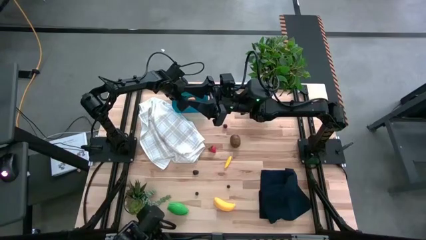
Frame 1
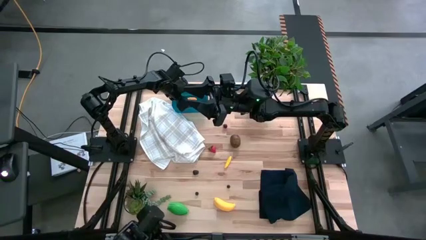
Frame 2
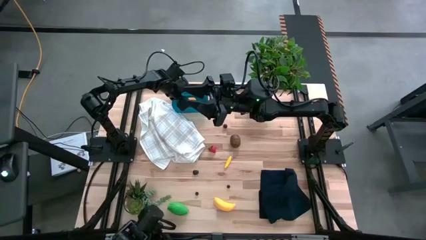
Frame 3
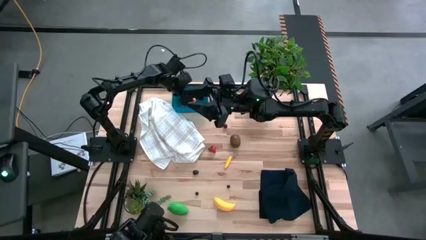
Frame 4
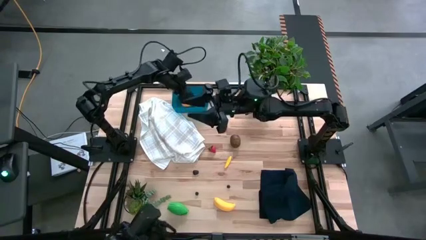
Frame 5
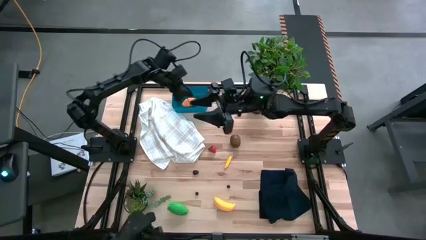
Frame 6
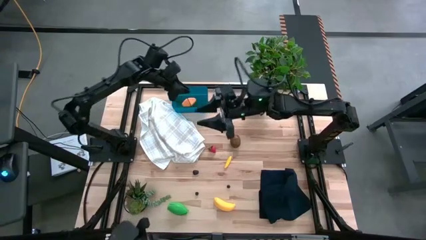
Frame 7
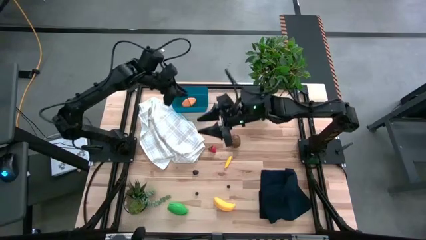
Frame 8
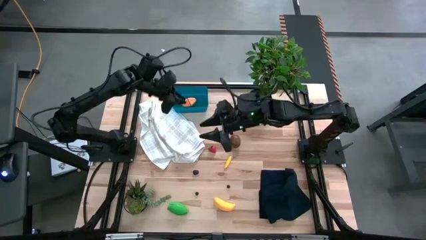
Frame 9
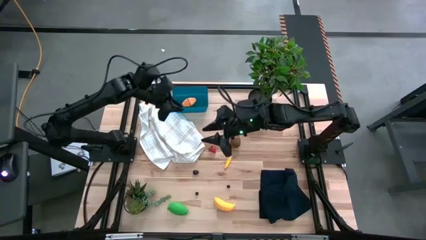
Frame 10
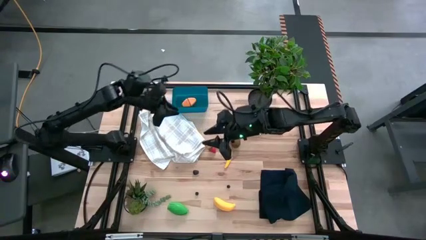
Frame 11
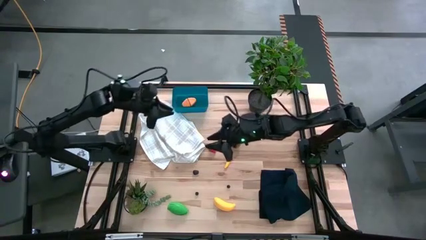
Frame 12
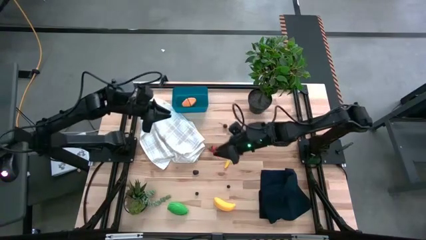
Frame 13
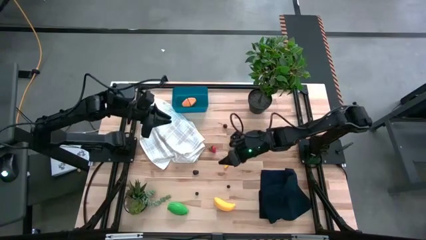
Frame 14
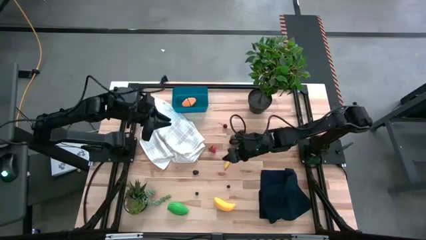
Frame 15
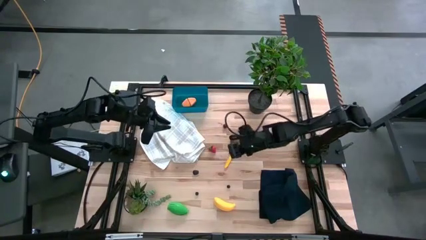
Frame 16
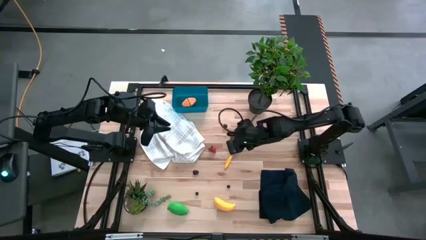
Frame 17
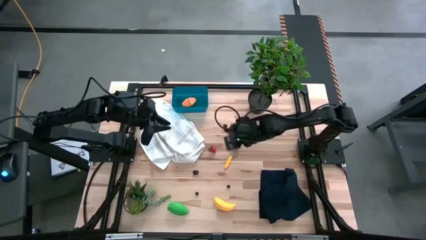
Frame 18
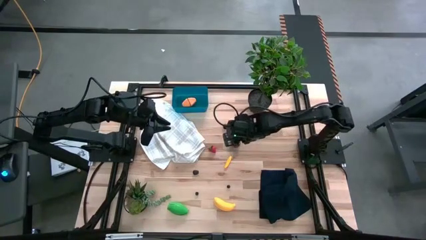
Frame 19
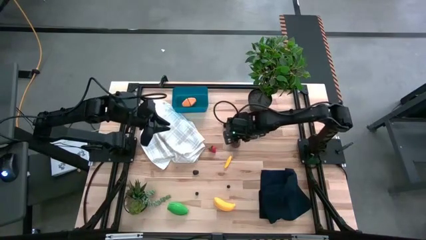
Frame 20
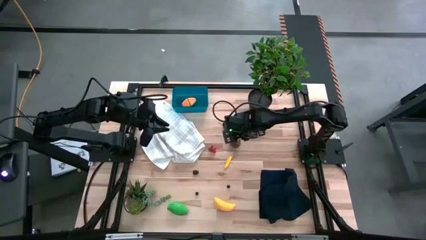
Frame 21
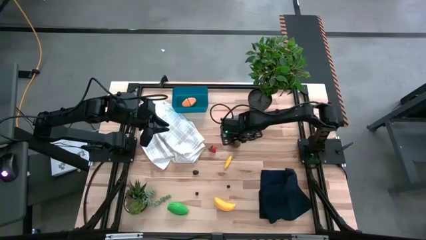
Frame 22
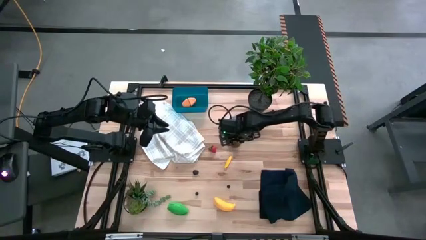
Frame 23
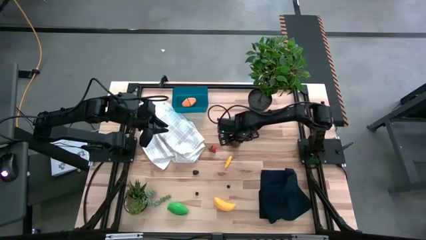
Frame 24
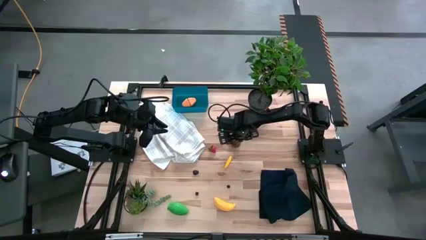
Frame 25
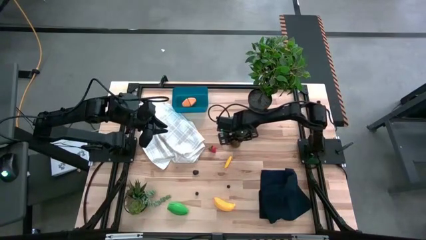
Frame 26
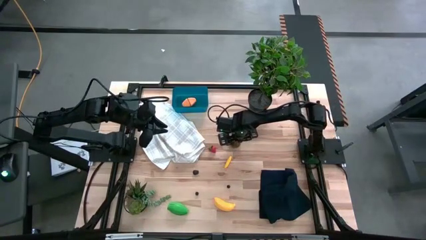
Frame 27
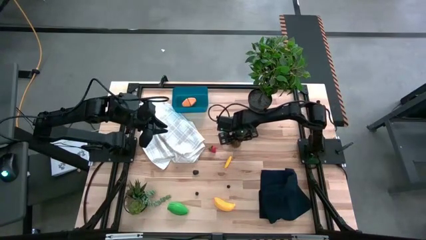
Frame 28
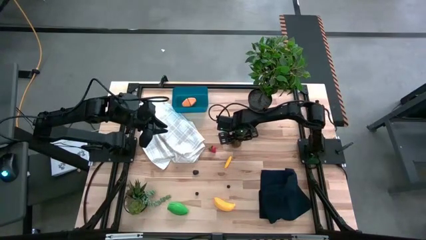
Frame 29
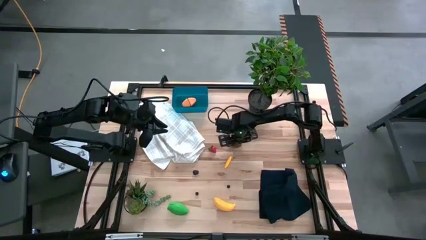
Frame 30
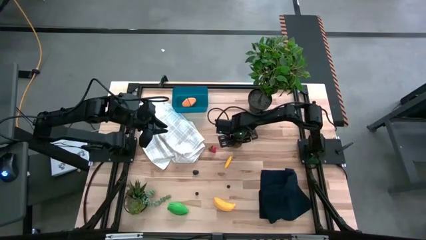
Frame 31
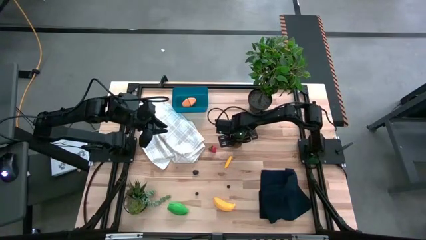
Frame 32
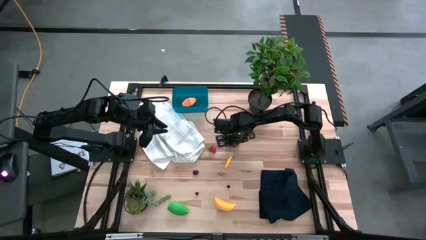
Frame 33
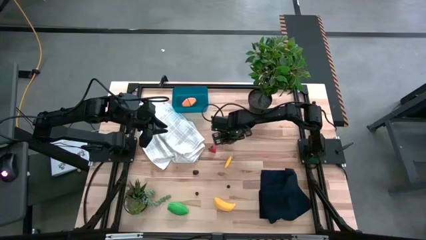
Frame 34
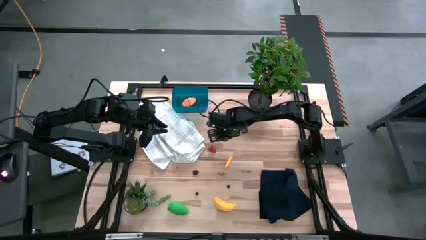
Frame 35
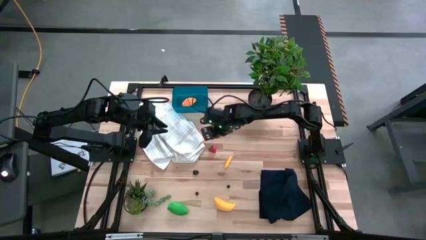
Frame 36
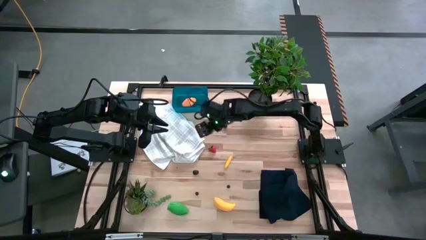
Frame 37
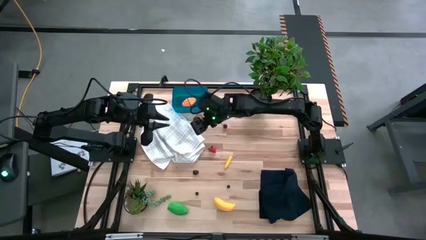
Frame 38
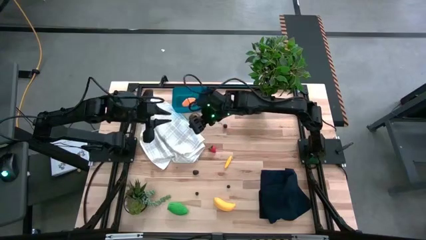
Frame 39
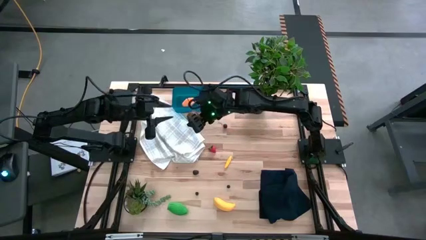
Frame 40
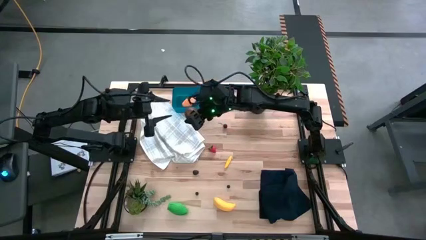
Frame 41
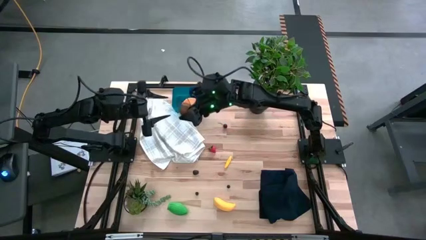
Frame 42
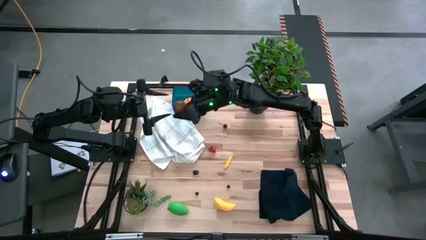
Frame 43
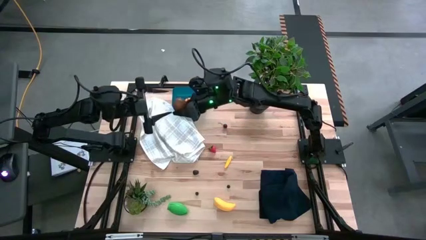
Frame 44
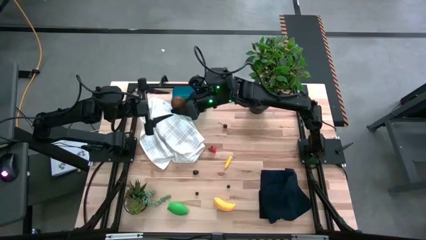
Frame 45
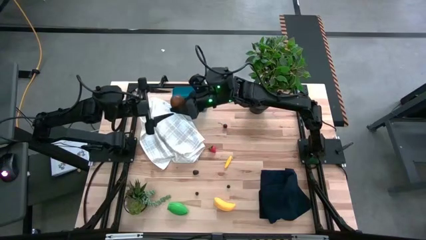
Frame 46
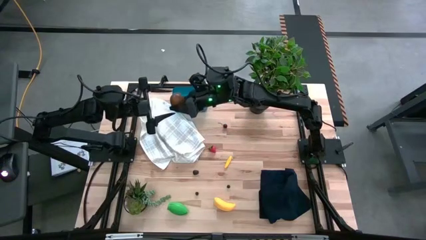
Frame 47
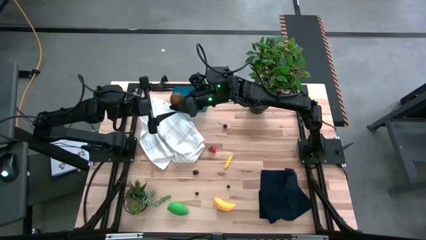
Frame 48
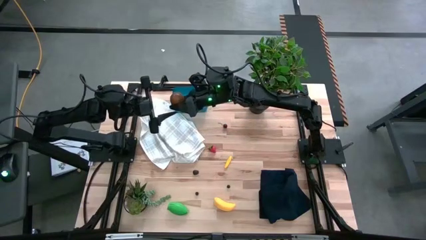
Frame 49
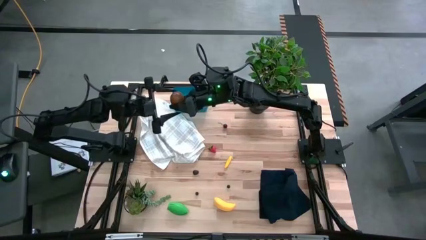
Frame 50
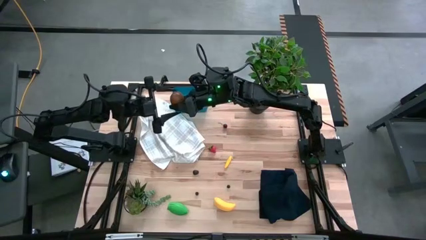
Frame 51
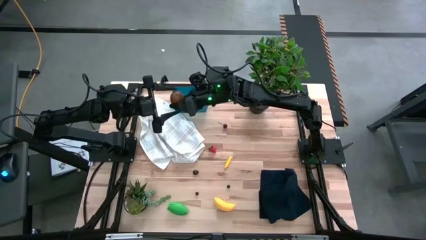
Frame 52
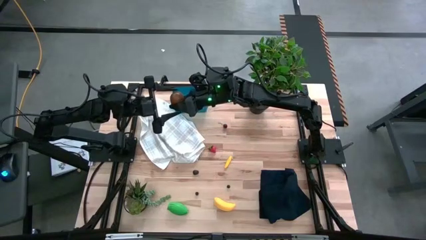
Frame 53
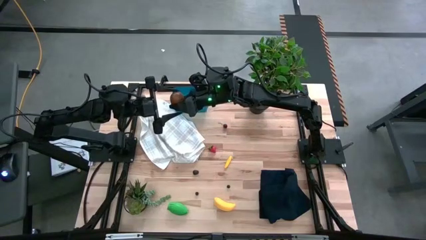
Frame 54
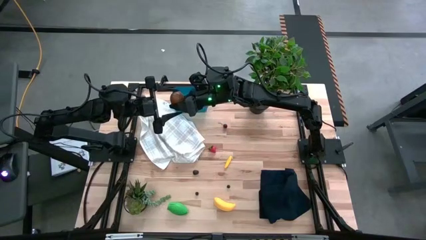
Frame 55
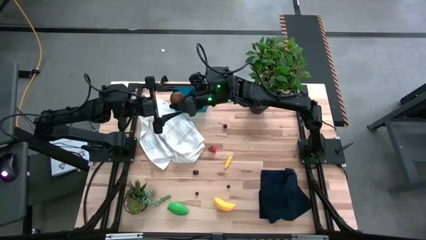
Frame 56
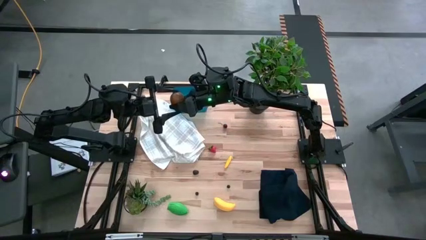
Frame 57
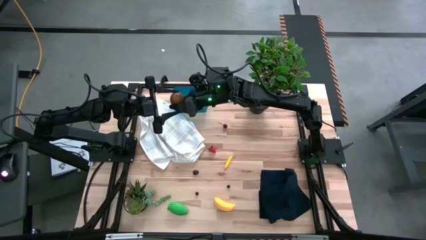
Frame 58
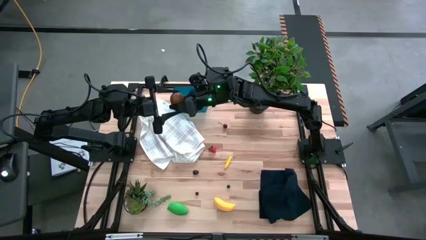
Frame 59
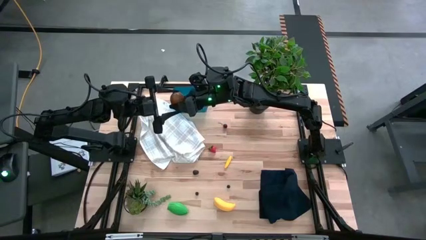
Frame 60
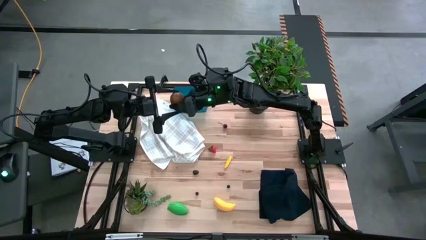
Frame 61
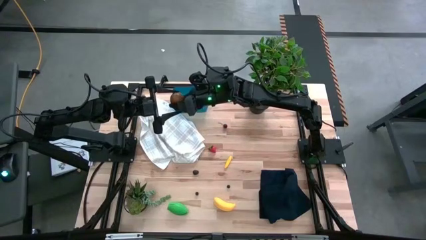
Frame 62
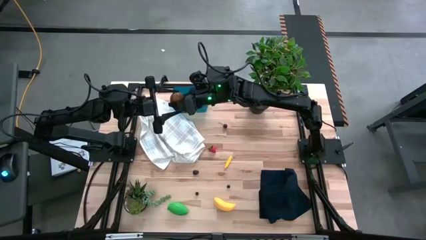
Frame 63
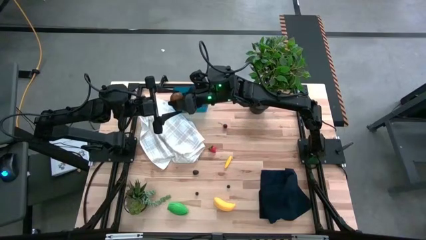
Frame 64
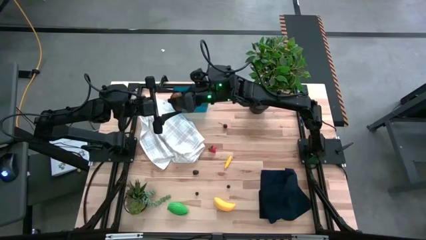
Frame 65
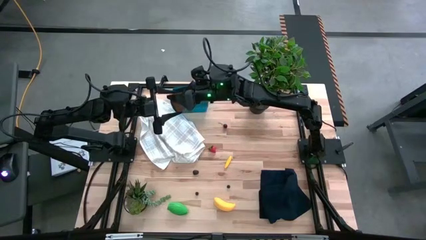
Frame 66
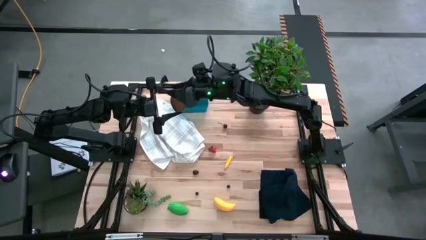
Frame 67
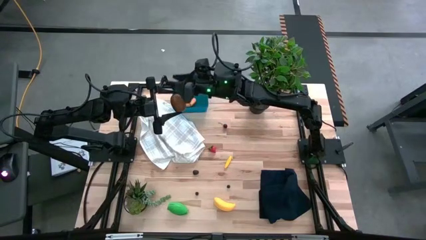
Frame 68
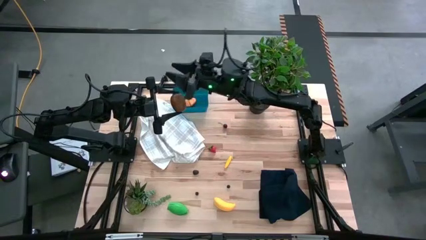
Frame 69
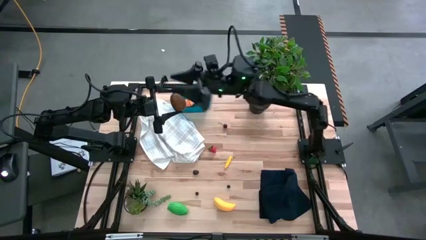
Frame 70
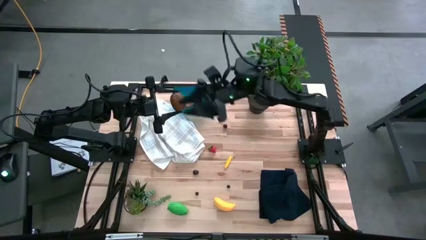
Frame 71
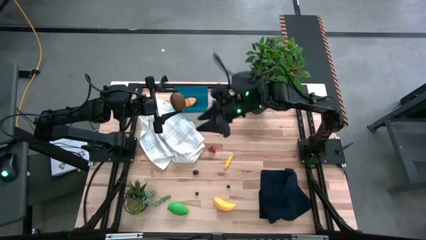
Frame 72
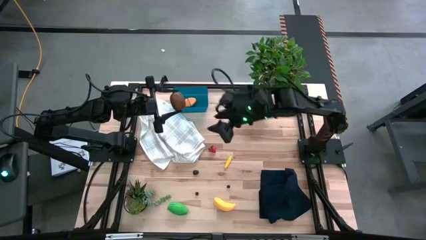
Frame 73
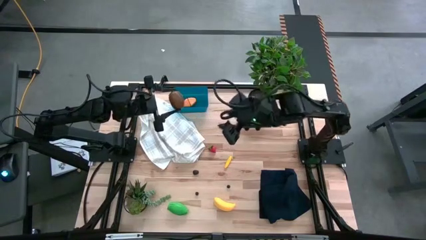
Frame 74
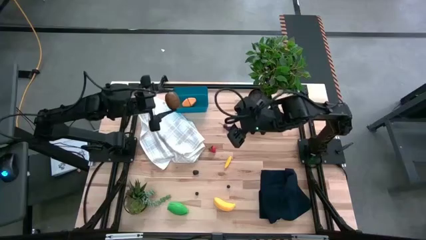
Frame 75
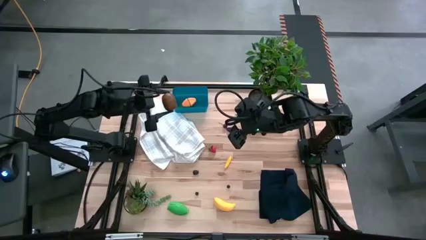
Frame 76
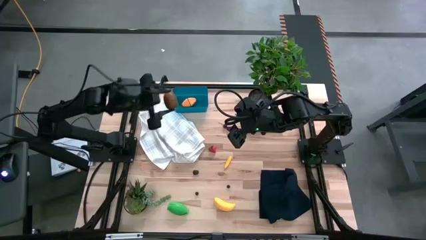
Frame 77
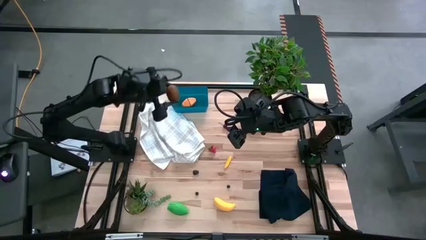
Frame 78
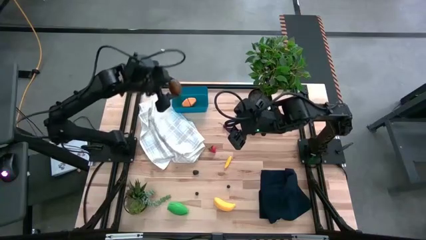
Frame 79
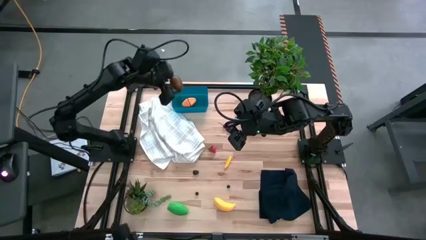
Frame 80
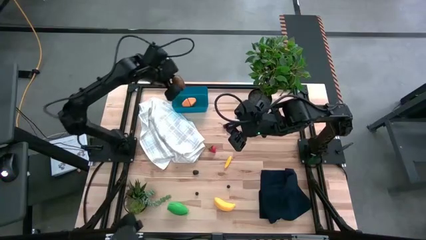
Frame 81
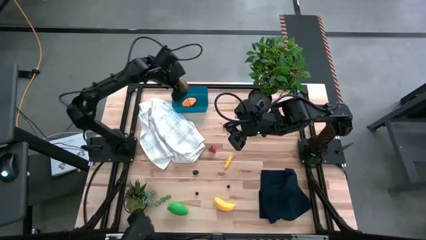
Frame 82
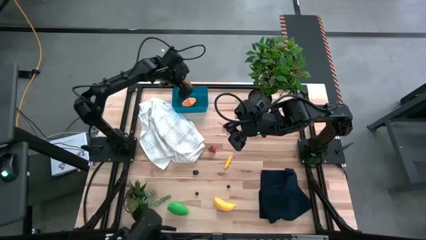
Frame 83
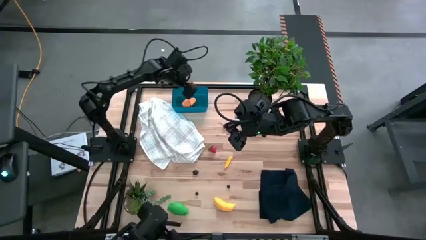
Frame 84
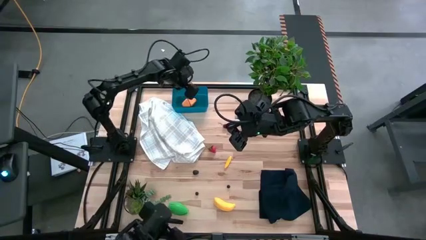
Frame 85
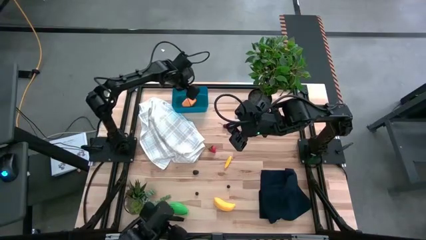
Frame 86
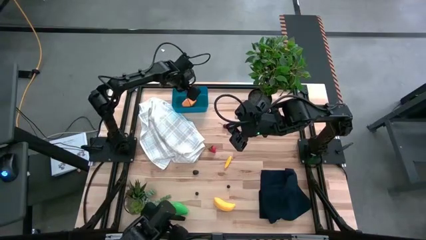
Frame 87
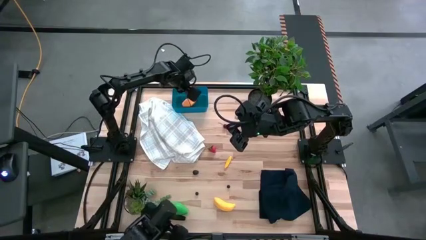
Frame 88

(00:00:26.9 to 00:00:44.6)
Task: Pick and placing Produce into tupperware
Put the brown kiwi into the blue bin
